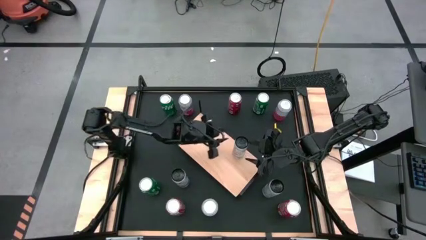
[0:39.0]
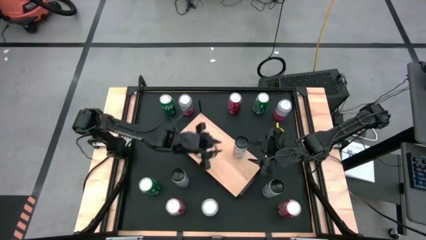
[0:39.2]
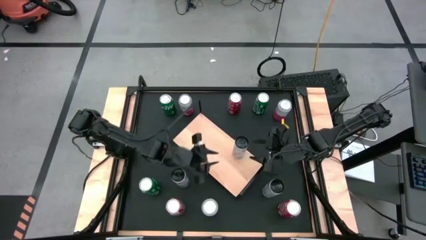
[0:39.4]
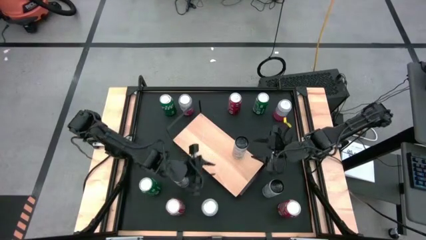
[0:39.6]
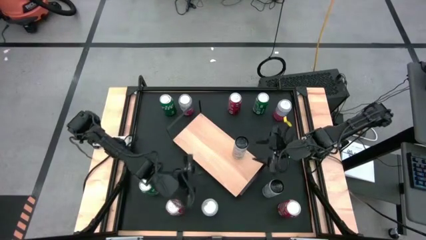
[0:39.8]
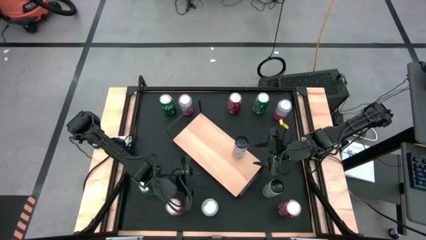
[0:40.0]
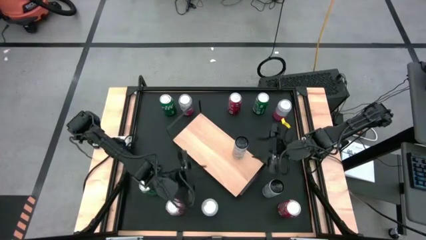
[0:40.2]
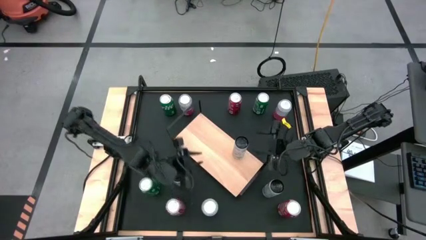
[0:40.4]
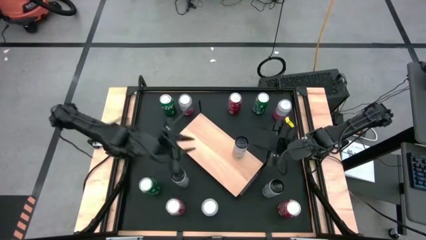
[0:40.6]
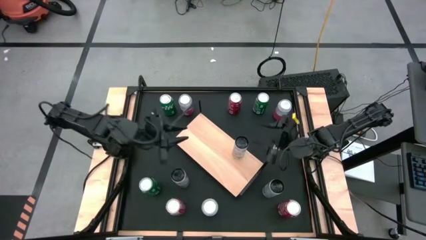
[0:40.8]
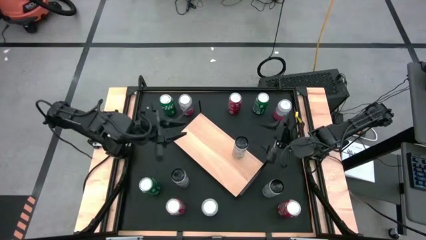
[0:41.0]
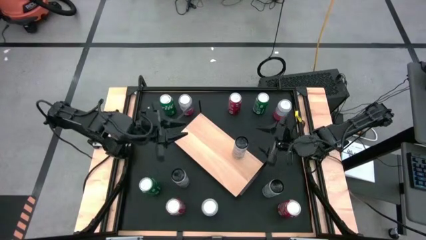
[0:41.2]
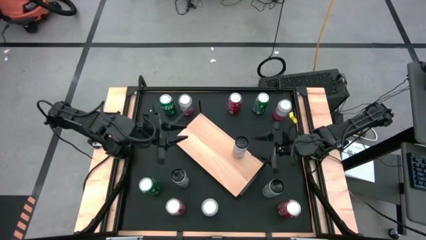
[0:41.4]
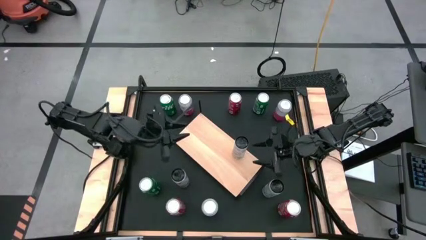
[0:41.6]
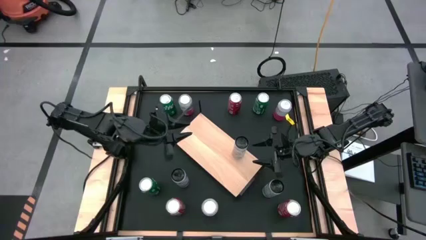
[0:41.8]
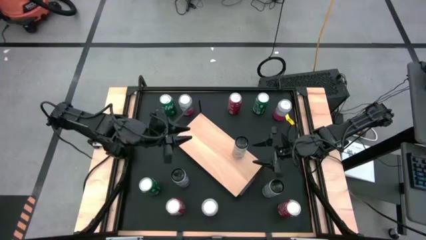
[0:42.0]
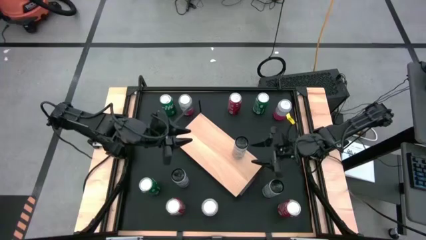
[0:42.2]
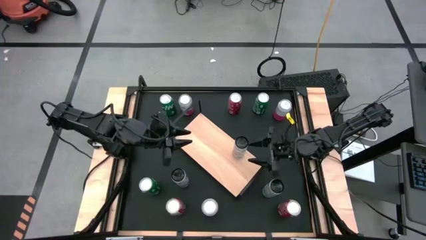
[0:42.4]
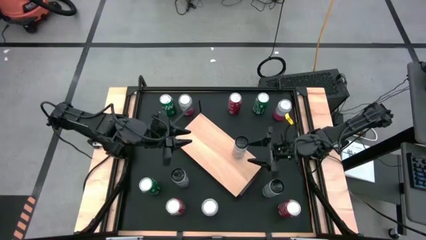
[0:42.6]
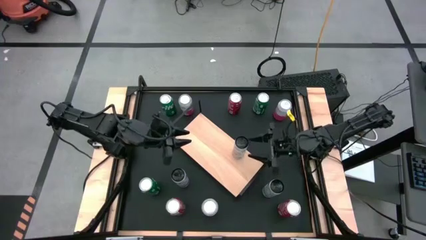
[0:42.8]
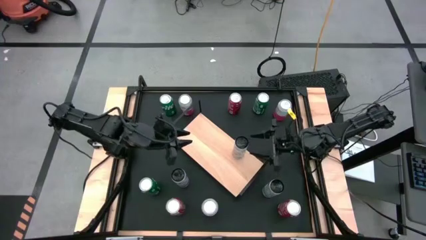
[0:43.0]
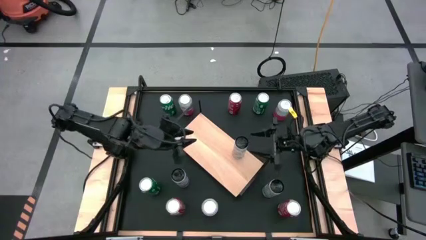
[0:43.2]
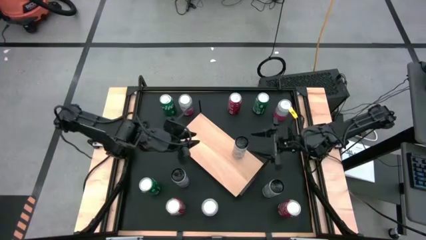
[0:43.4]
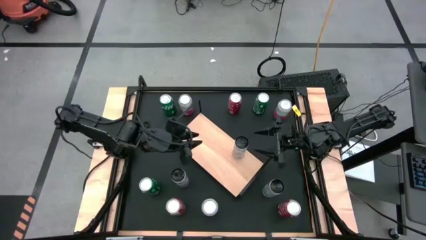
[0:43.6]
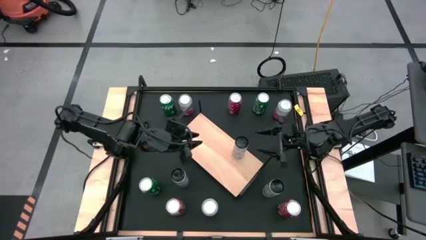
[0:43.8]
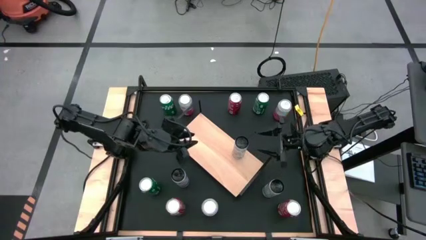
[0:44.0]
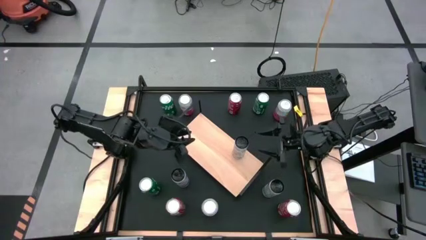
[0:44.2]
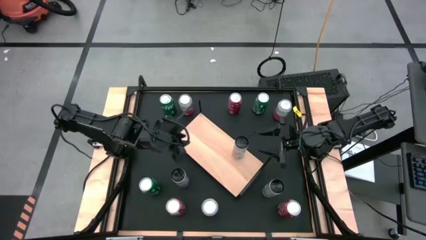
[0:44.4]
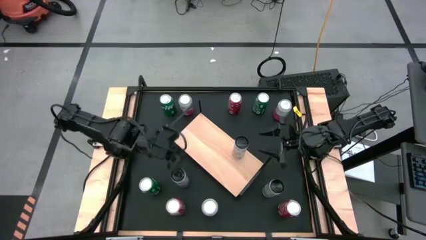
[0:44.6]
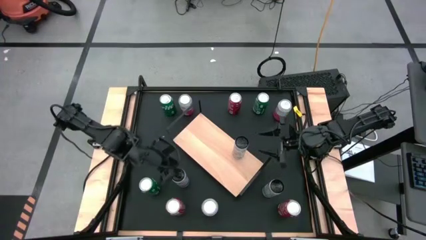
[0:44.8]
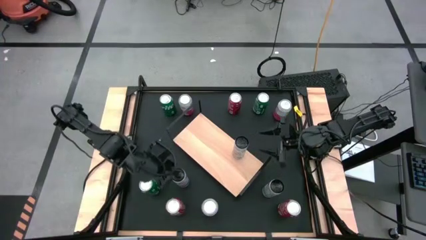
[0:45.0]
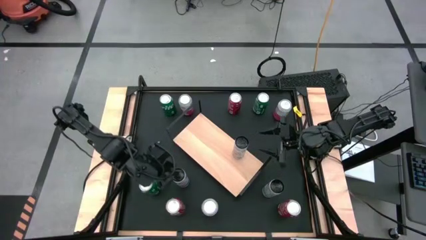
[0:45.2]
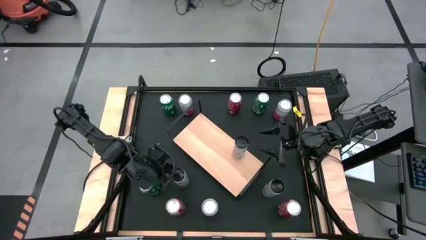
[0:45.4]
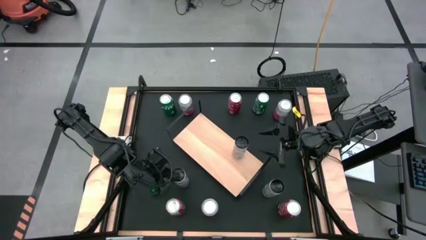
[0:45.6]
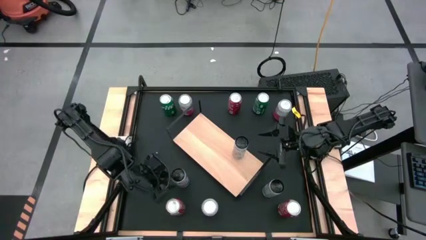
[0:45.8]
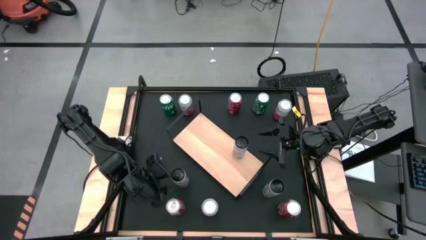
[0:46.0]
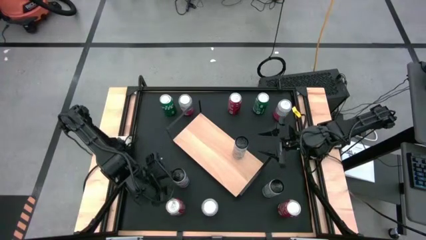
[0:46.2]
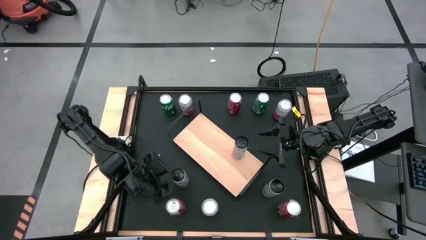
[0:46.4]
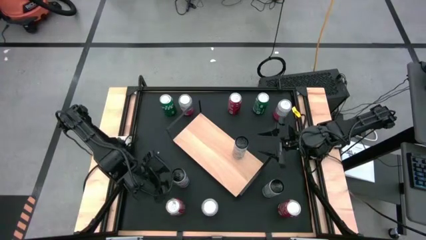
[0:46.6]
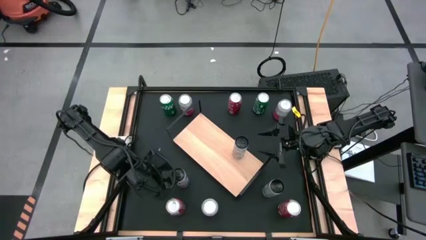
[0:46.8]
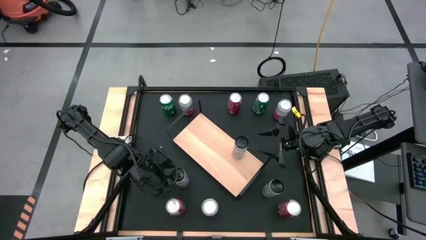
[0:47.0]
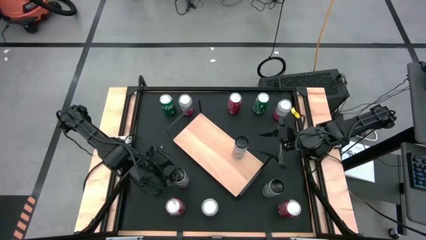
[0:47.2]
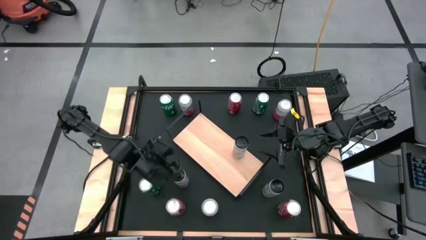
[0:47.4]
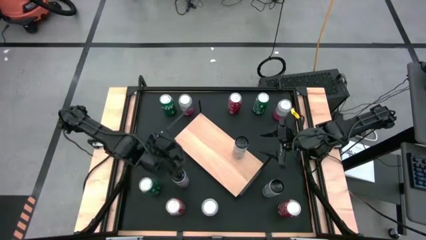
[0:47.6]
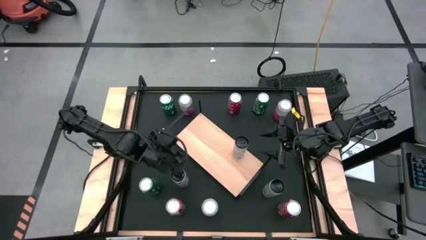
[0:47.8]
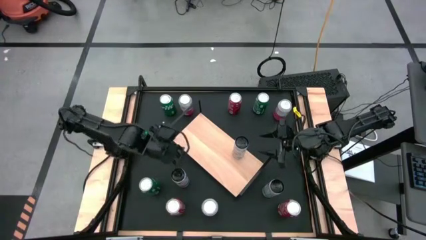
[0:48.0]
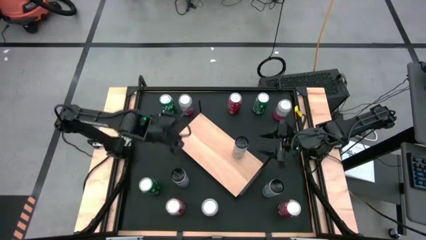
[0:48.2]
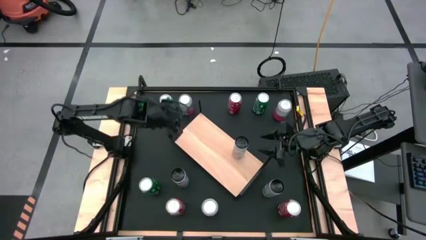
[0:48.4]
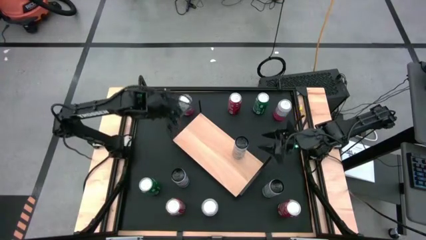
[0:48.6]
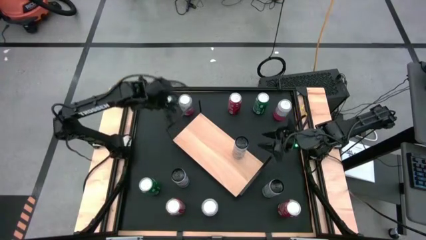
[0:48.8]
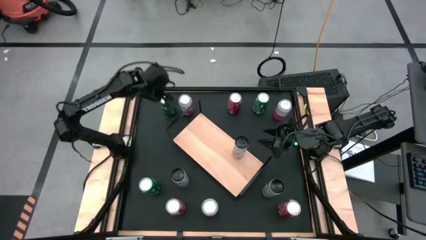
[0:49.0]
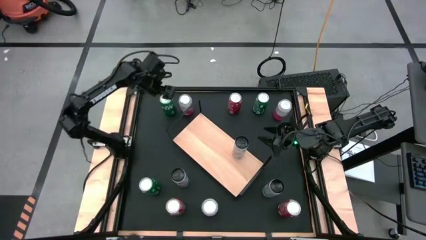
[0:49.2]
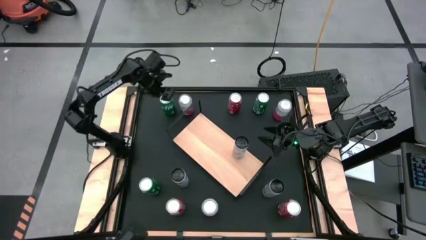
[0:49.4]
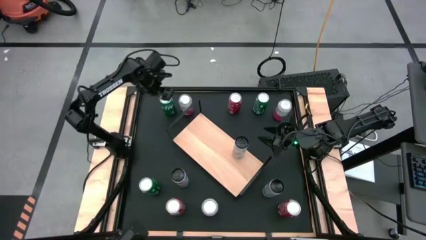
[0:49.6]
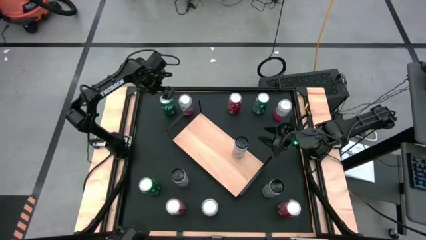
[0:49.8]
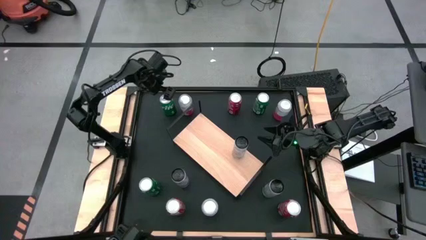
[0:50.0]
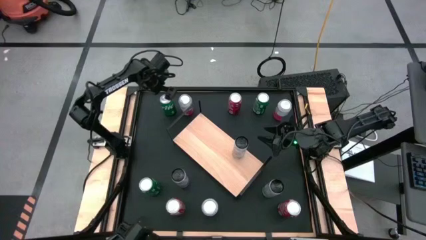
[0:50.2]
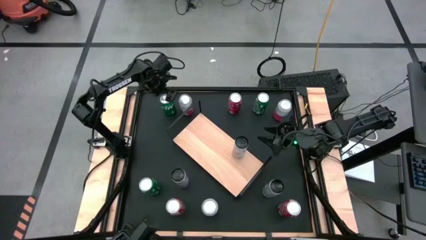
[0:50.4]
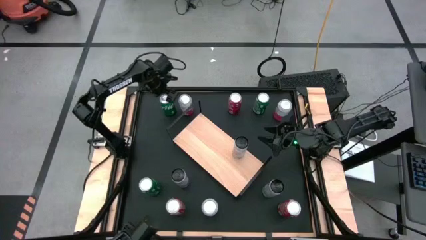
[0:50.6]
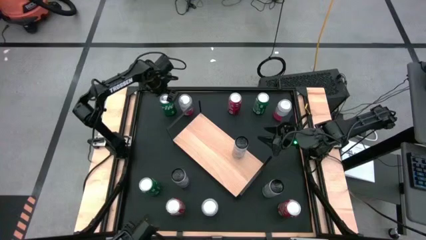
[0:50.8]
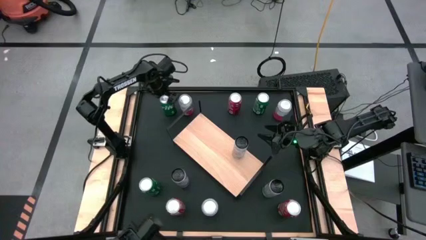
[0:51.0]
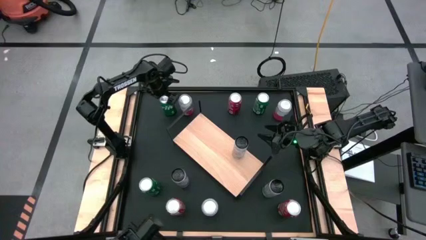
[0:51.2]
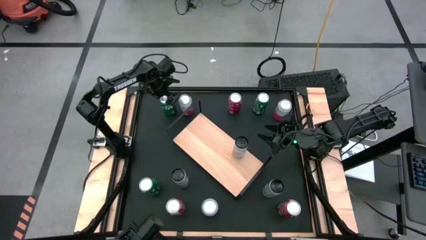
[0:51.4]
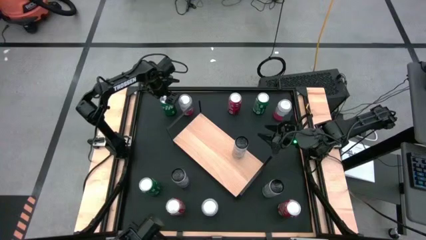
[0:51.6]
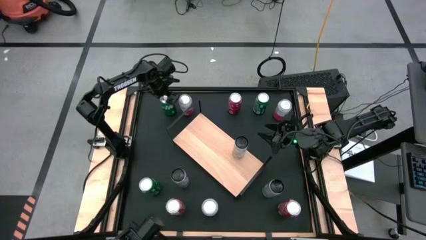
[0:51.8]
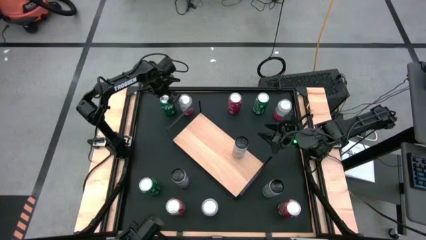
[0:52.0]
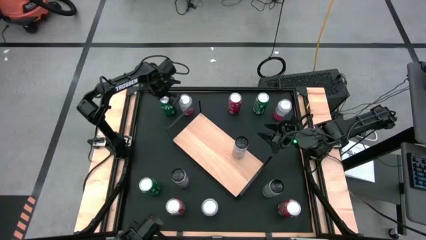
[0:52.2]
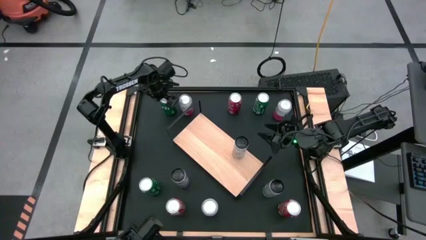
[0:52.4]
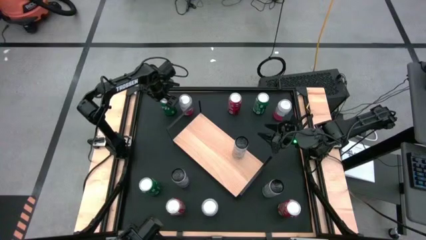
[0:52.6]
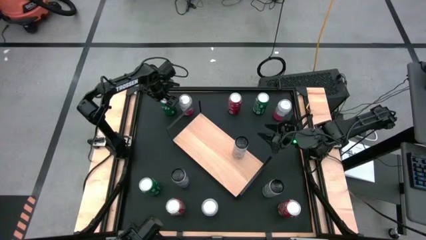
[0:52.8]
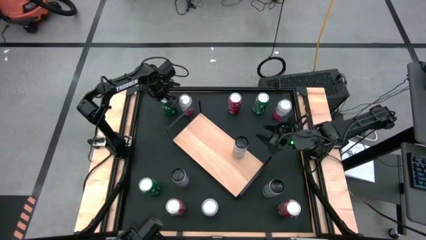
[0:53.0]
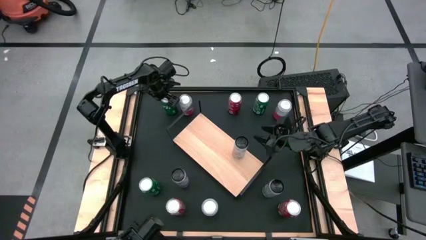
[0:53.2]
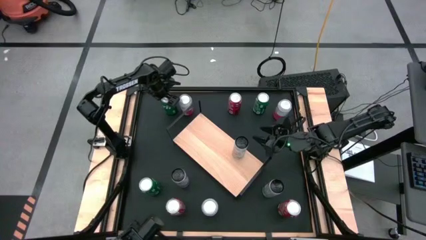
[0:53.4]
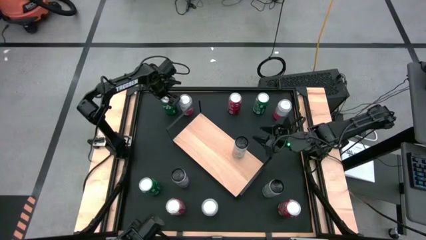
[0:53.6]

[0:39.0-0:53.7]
Task: Place canned beverage on shelf
Put the top left green soda can on the shelf
